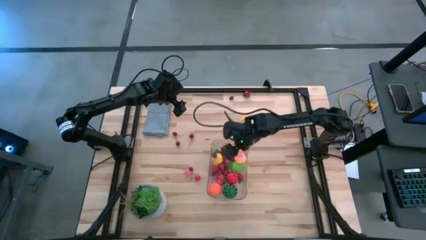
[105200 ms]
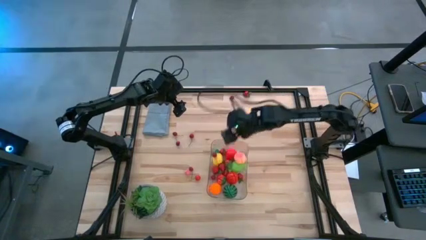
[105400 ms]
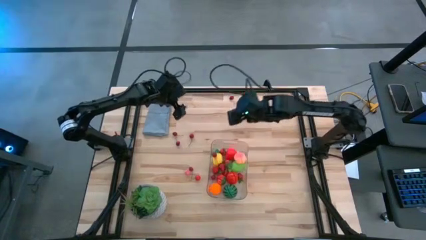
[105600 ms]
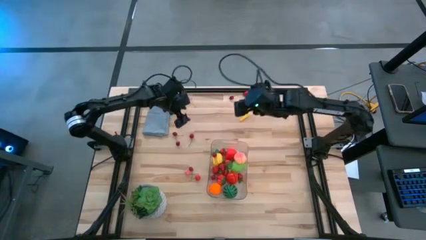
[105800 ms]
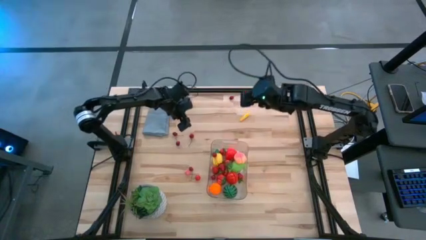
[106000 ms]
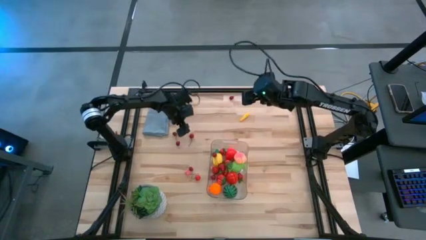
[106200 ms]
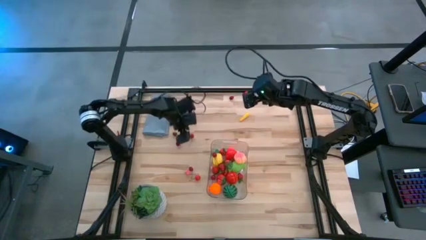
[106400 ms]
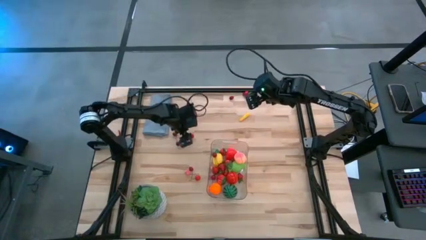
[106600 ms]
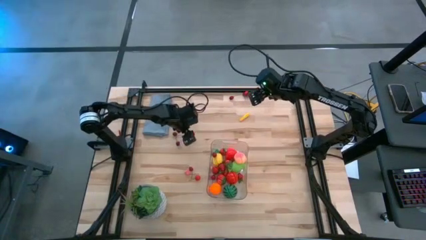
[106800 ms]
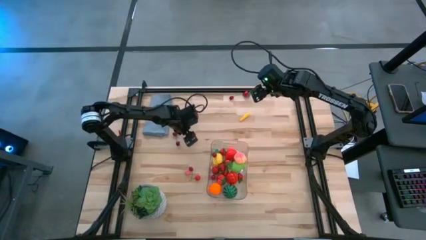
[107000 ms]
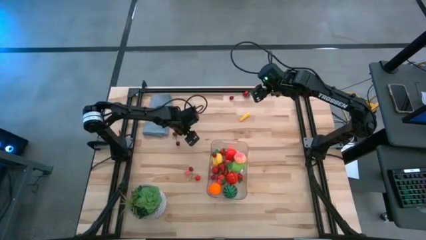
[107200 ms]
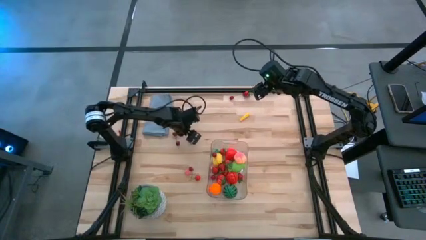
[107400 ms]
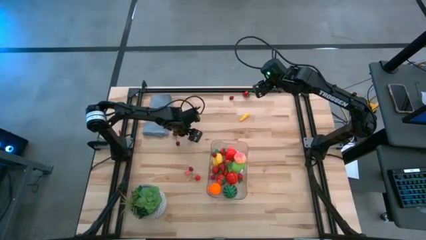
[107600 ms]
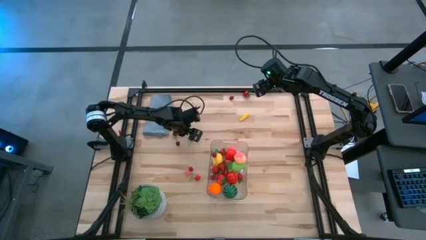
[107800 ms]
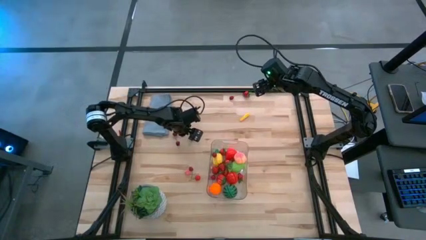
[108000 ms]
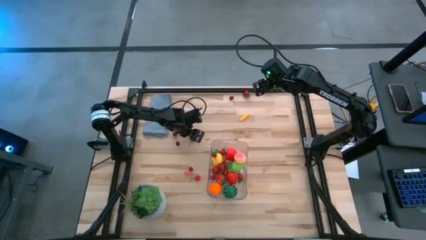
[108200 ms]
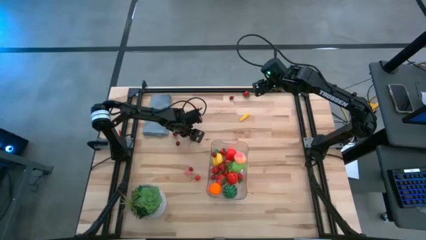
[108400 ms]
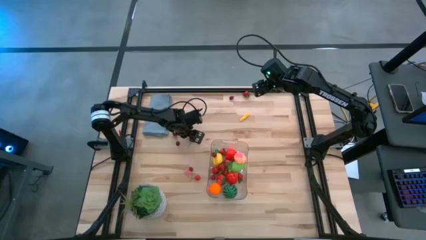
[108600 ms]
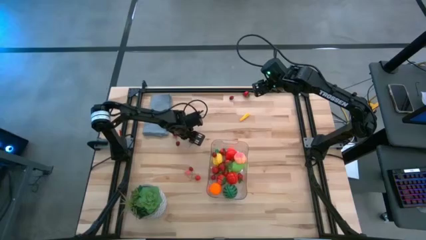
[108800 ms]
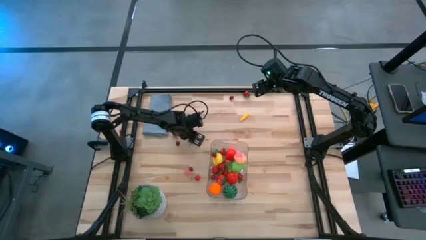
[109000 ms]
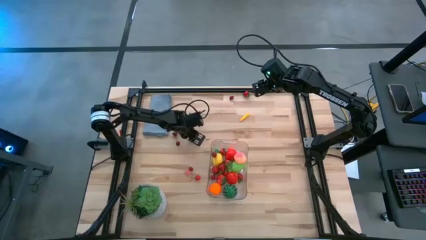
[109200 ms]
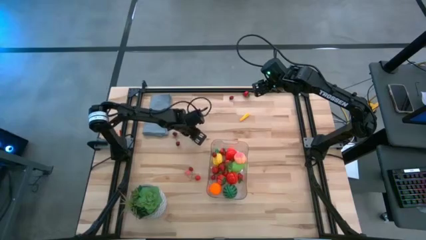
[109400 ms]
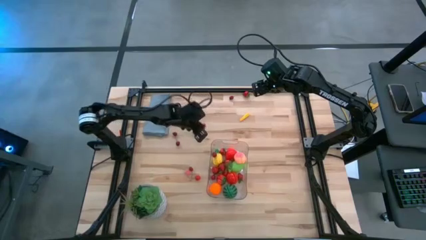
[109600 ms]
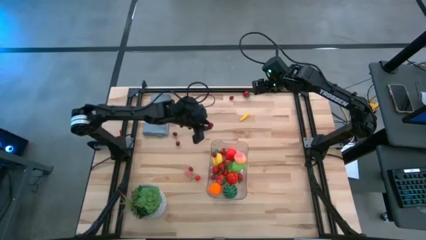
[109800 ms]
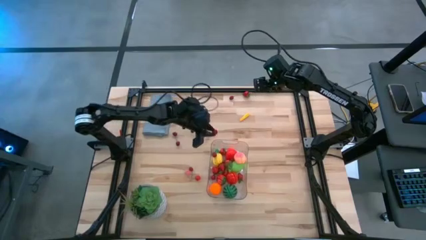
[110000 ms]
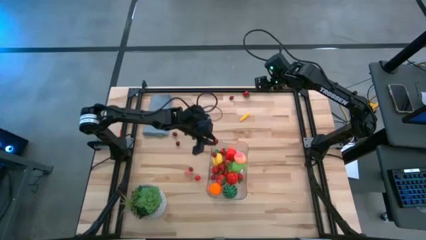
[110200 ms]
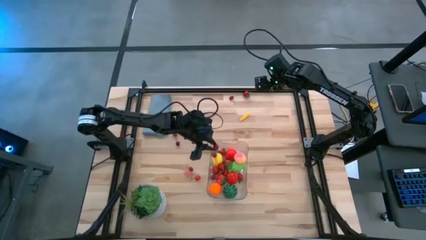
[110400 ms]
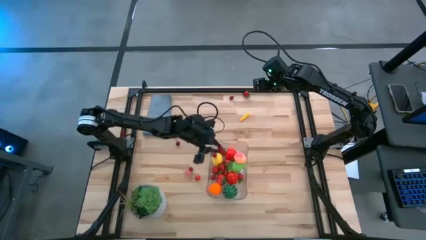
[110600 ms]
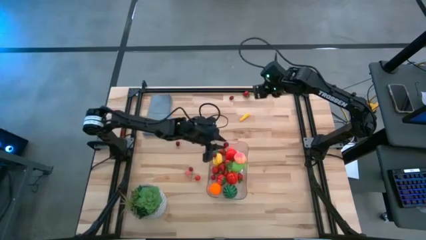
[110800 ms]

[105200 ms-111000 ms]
Task: Pick and placing Produce into tupperware
Put the cherry into the transparent bin

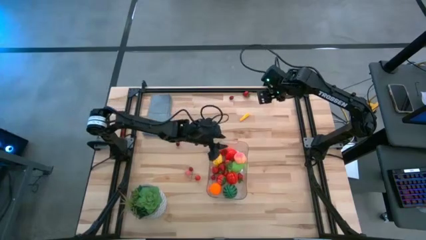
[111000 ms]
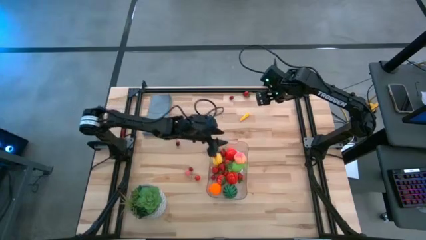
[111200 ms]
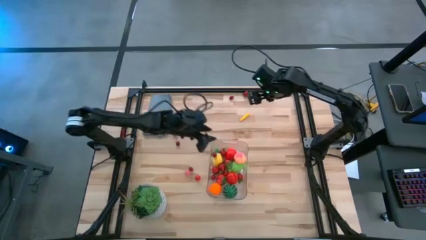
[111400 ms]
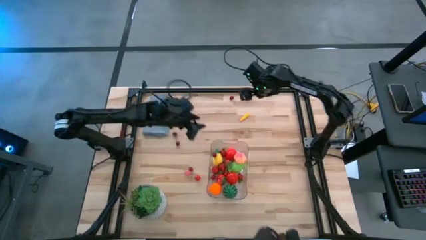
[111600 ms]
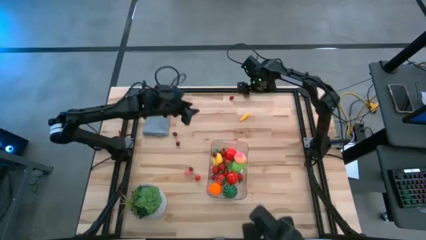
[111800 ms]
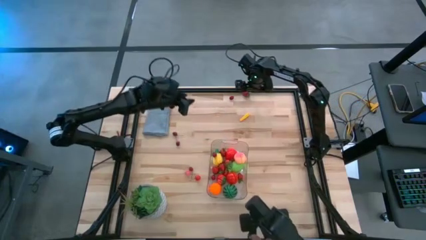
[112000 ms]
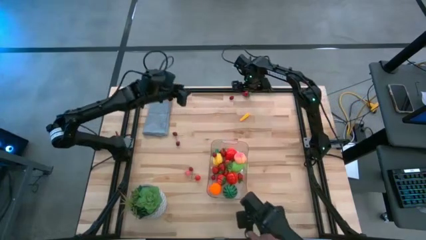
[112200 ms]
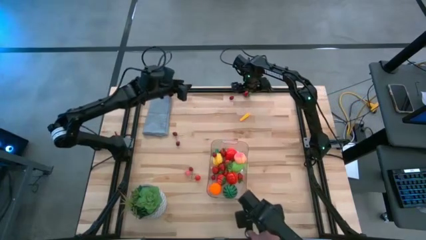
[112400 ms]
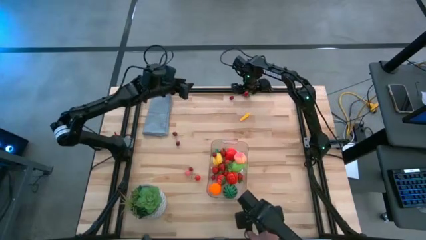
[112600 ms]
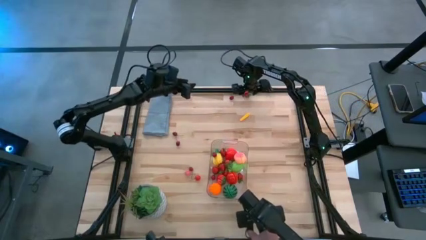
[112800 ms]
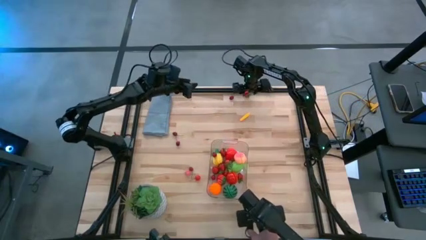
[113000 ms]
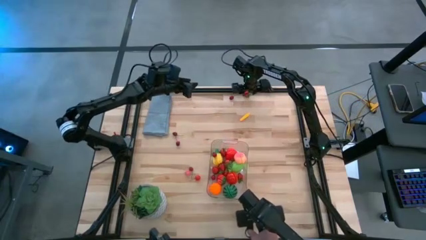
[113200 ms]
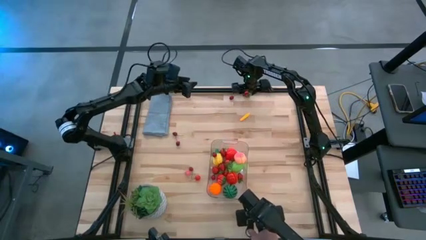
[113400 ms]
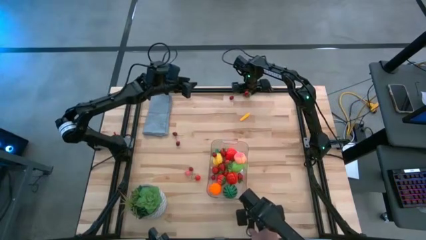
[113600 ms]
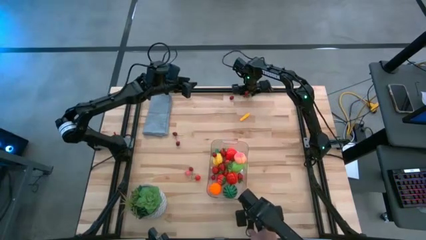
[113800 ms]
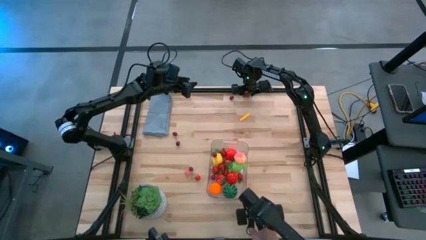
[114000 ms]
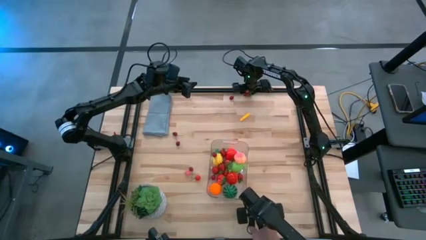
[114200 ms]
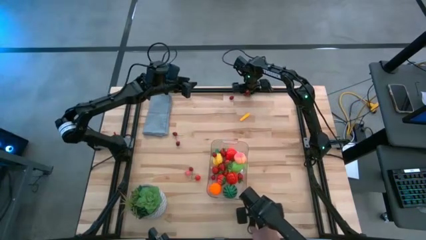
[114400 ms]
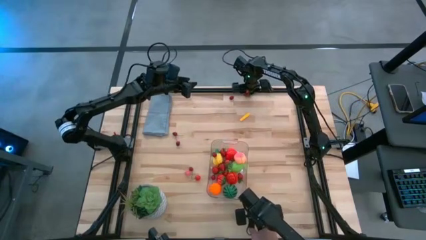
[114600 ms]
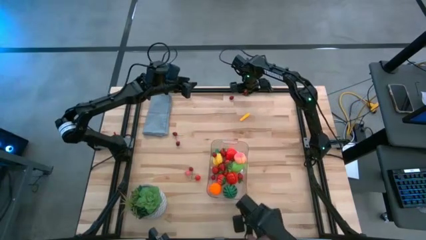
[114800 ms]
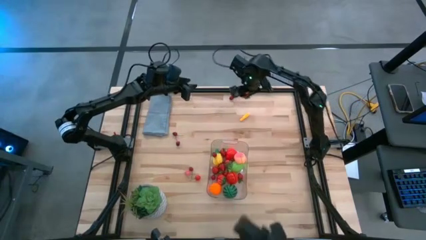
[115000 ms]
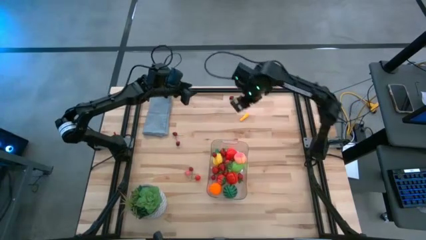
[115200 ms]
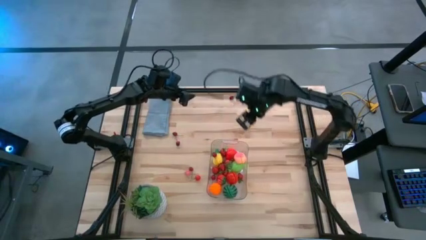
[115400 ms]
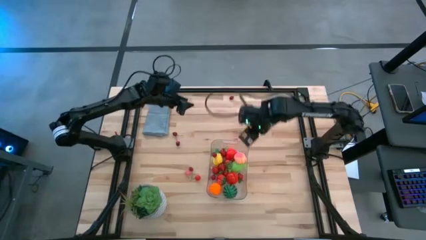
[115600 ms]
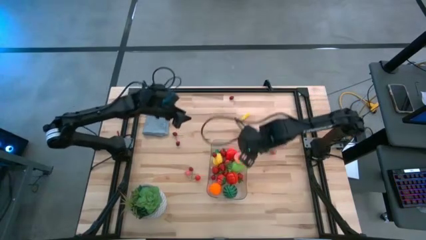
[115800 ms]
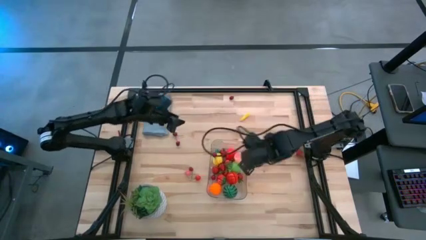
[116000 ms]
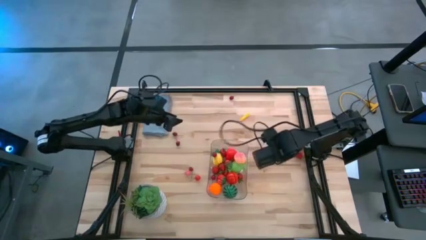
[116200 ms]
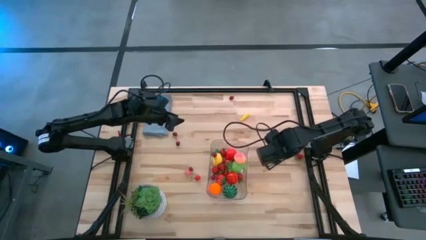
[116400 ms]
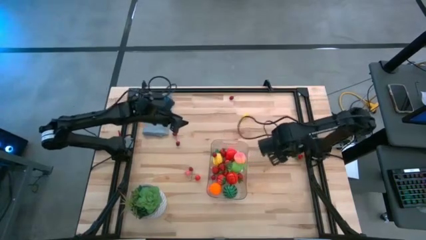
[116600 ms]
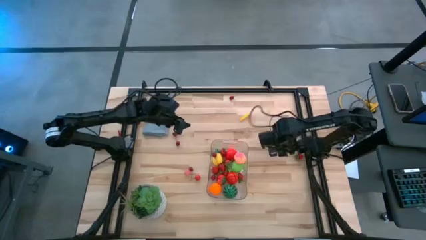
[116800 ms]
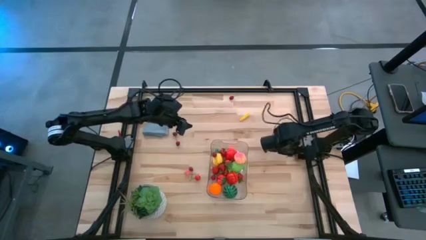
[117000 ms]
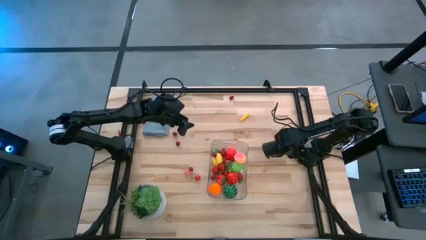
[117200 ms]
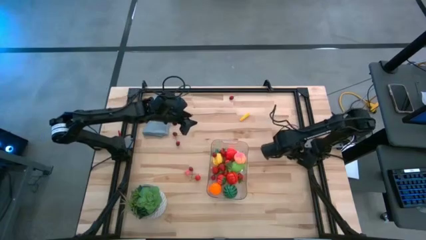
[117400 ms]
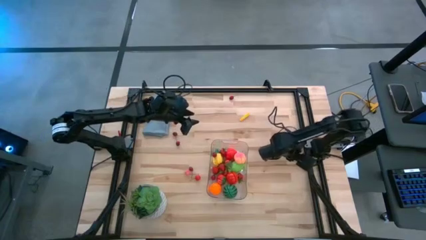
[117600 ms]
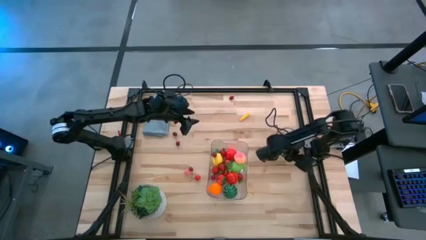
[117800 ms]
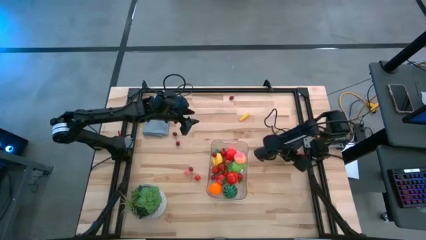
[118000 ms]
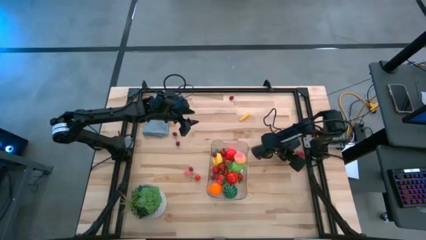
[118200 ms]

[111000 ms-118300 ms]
Put the strawberry into the transparent bin
